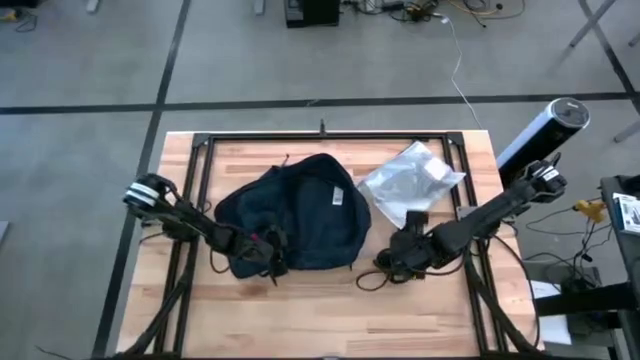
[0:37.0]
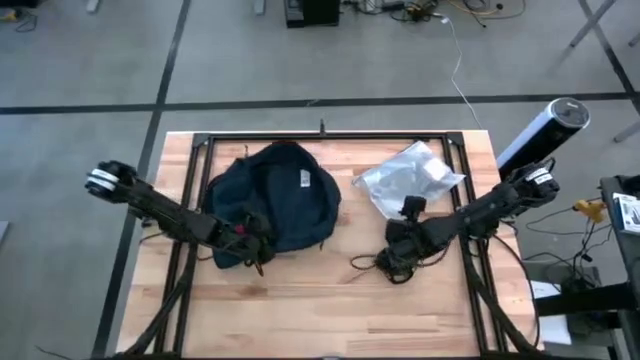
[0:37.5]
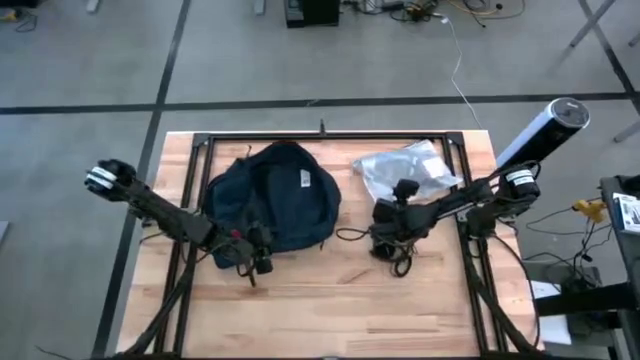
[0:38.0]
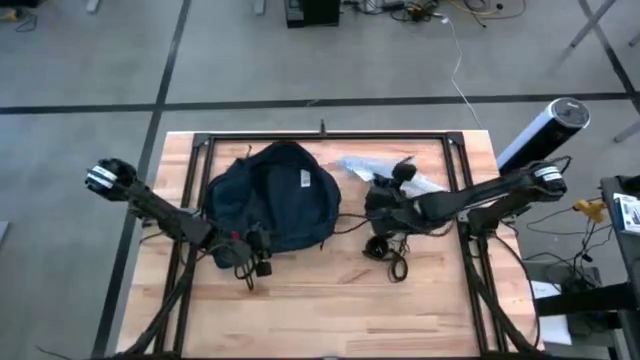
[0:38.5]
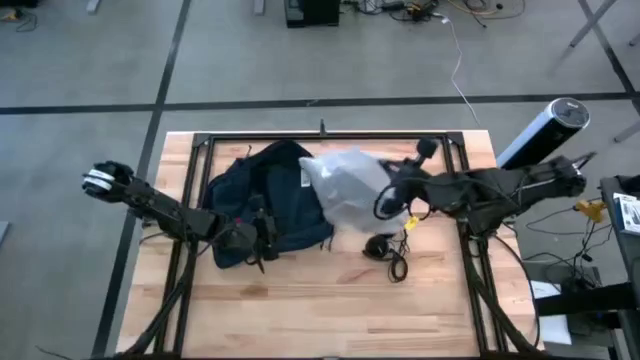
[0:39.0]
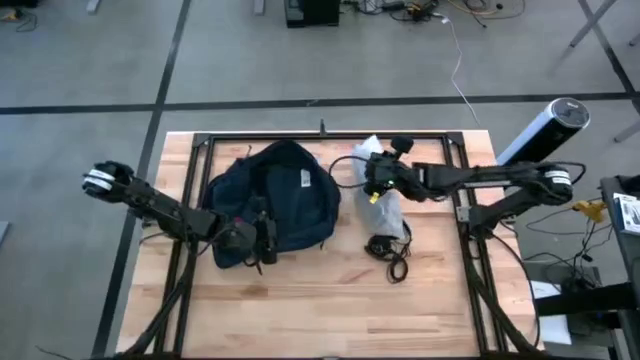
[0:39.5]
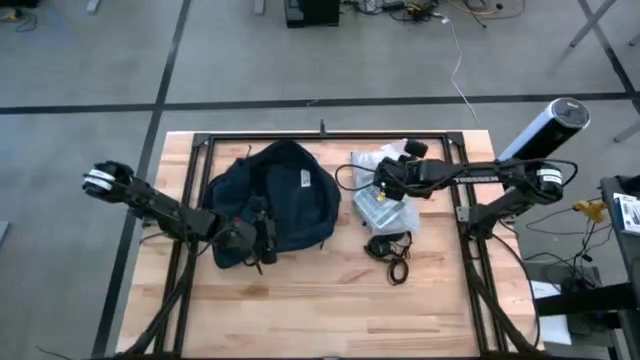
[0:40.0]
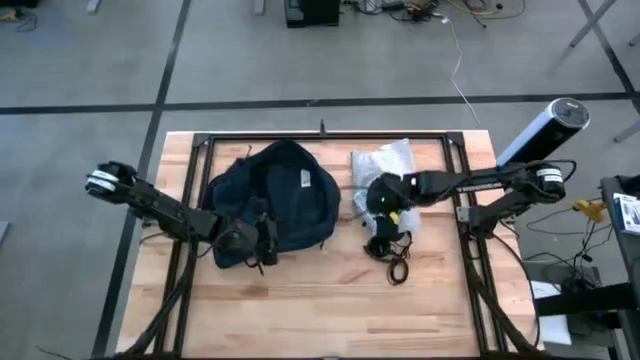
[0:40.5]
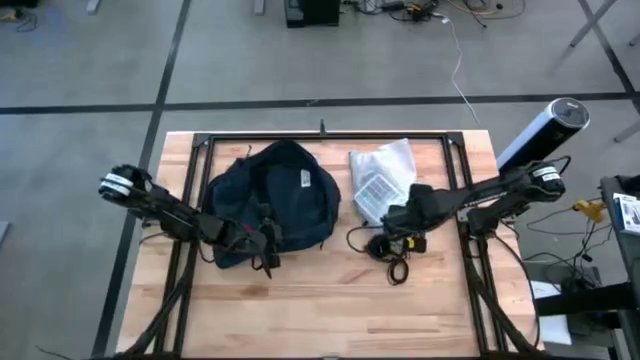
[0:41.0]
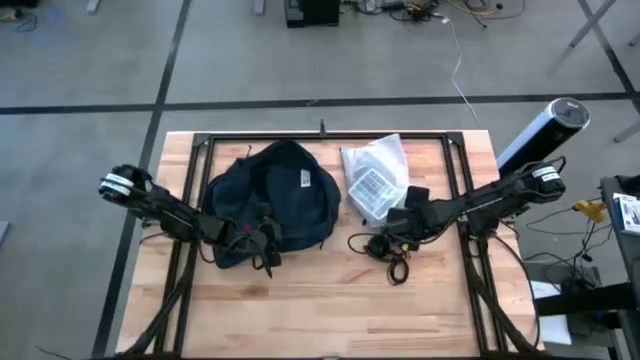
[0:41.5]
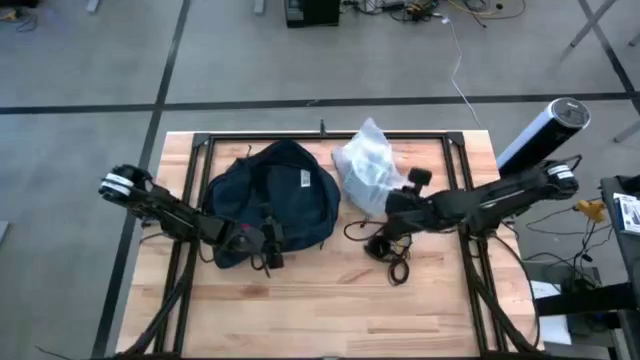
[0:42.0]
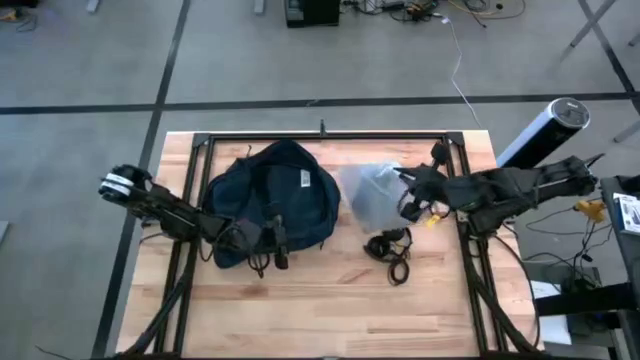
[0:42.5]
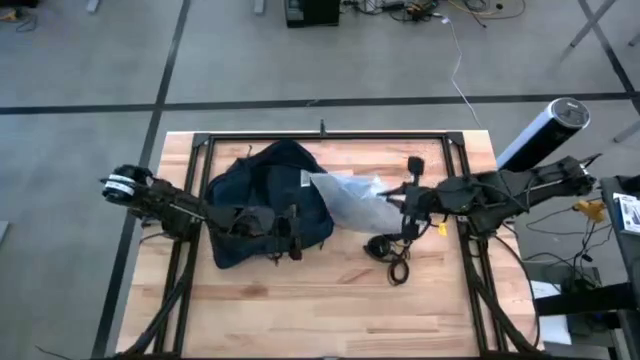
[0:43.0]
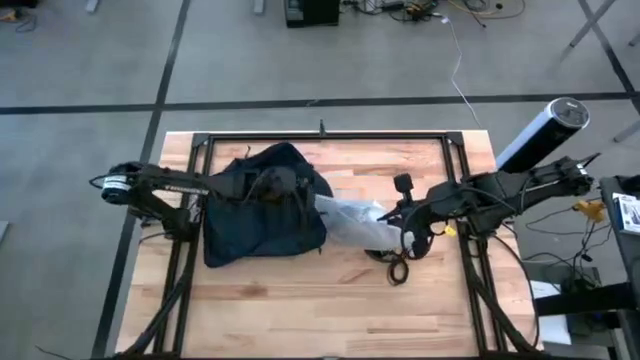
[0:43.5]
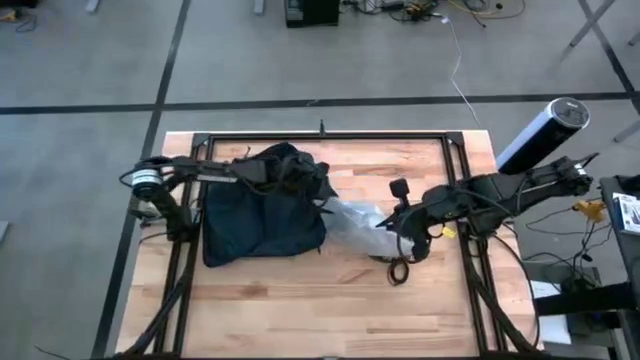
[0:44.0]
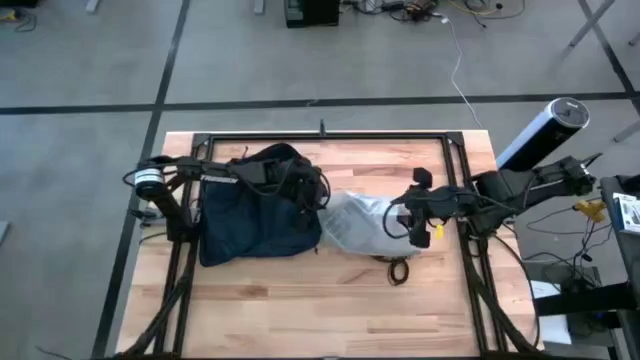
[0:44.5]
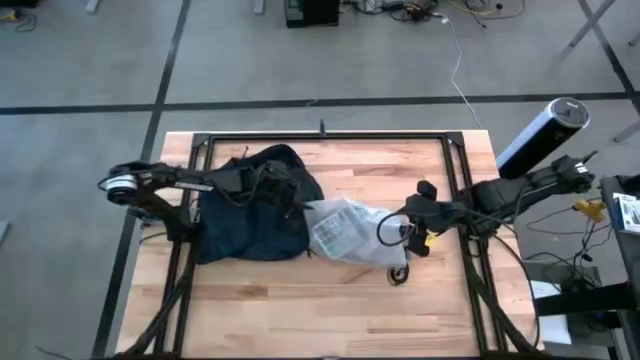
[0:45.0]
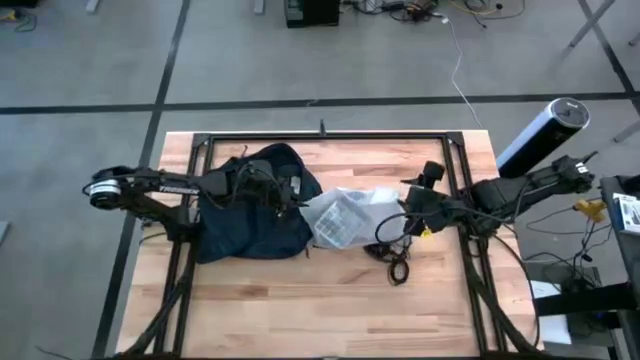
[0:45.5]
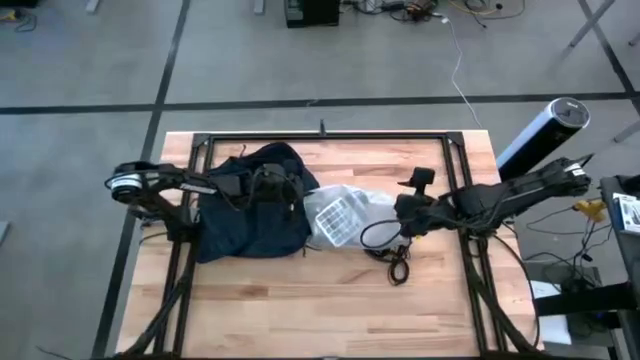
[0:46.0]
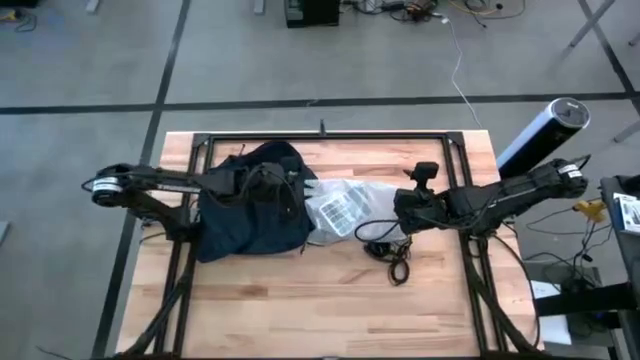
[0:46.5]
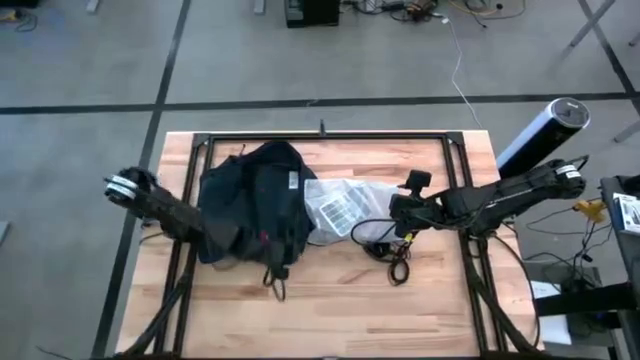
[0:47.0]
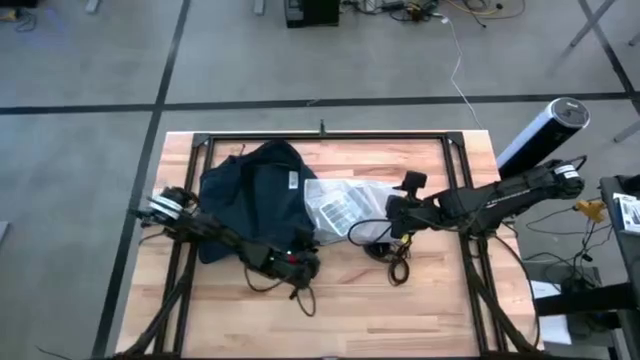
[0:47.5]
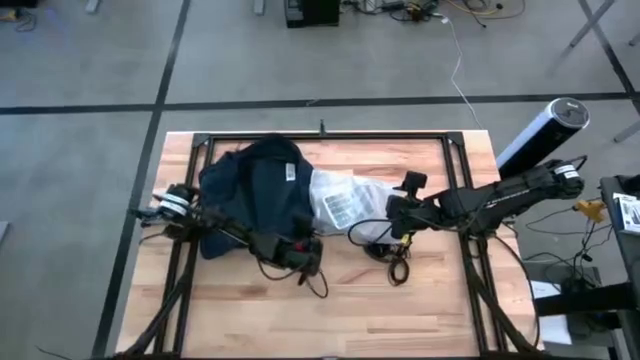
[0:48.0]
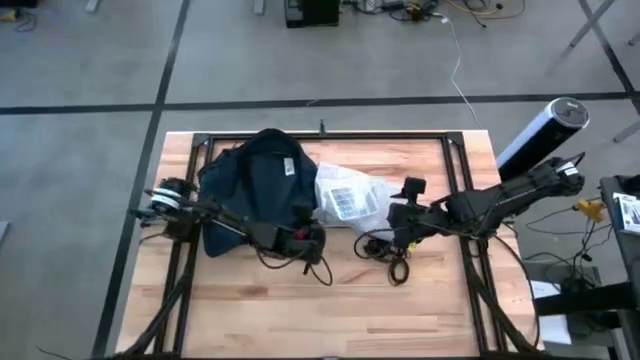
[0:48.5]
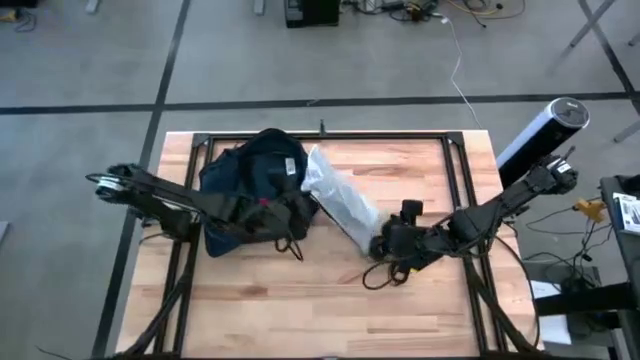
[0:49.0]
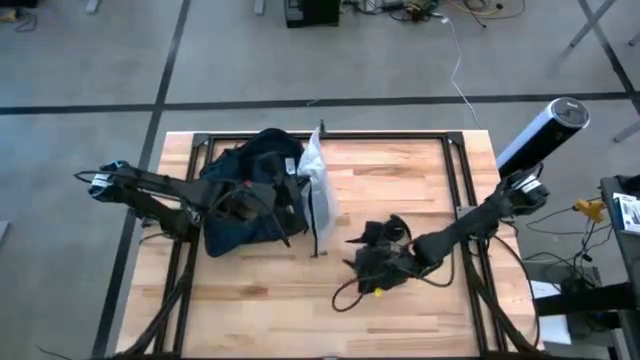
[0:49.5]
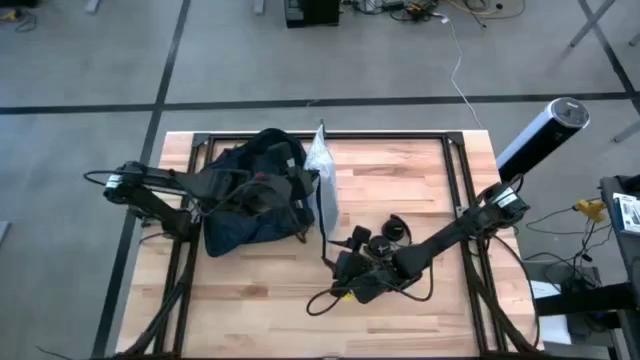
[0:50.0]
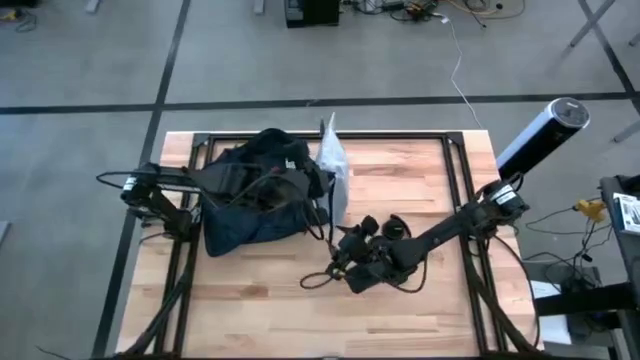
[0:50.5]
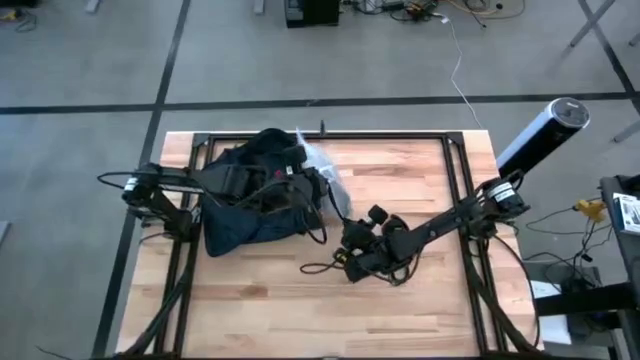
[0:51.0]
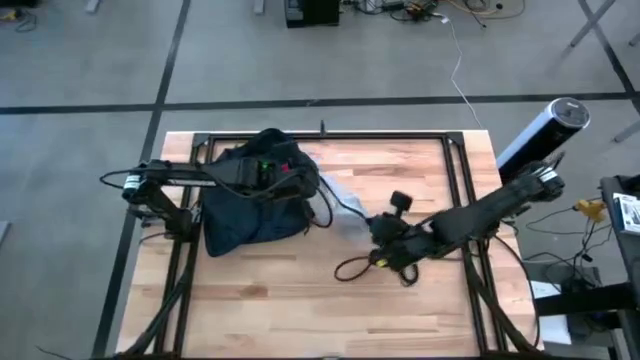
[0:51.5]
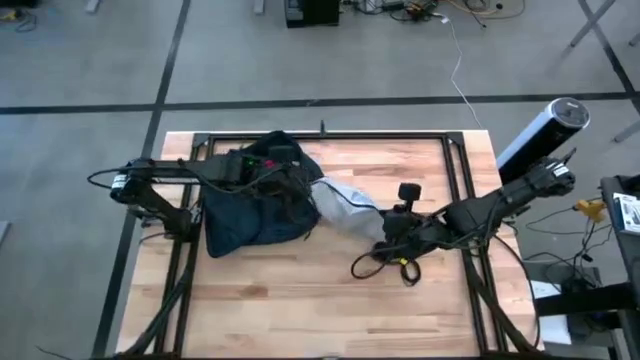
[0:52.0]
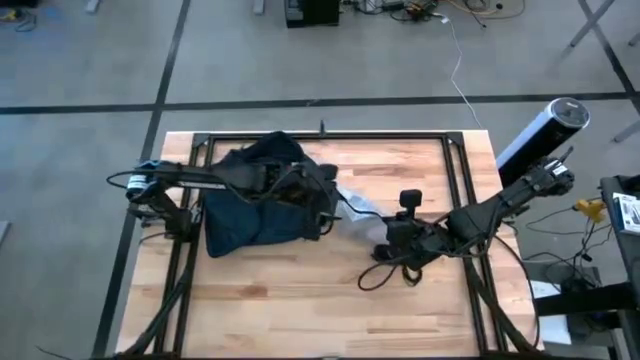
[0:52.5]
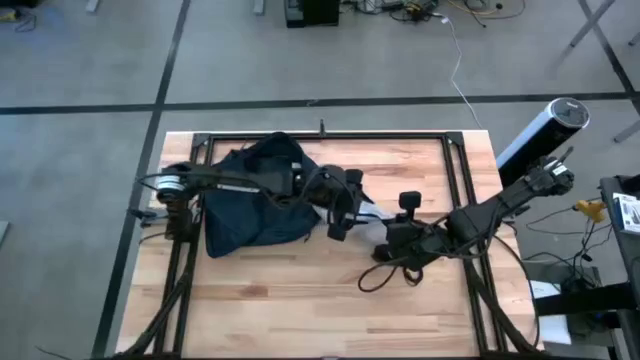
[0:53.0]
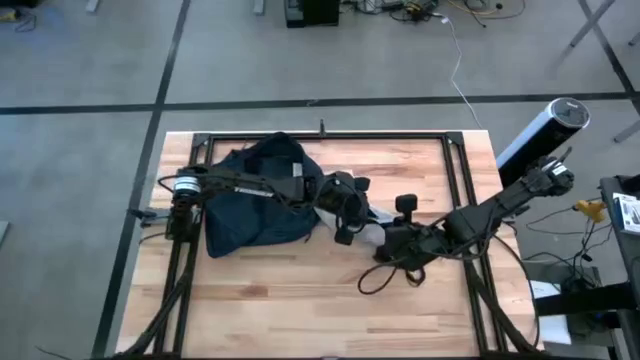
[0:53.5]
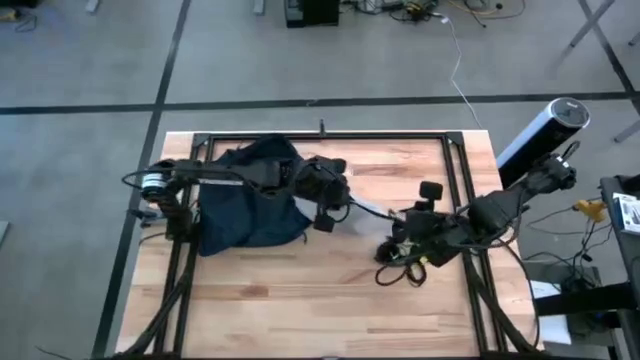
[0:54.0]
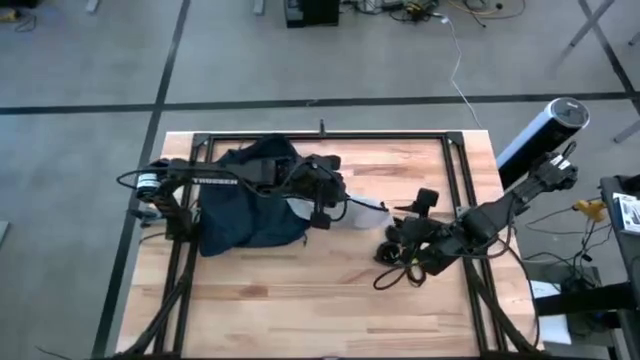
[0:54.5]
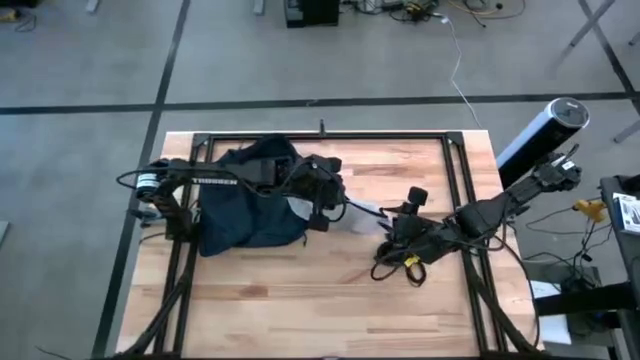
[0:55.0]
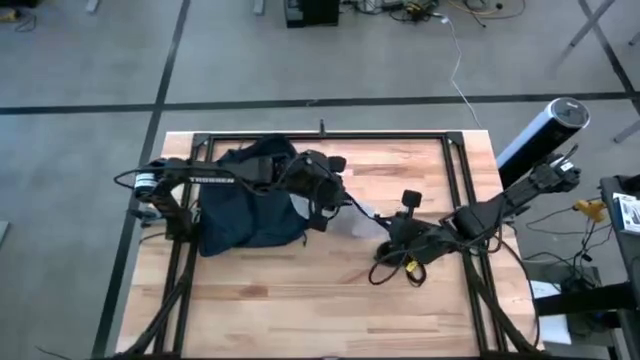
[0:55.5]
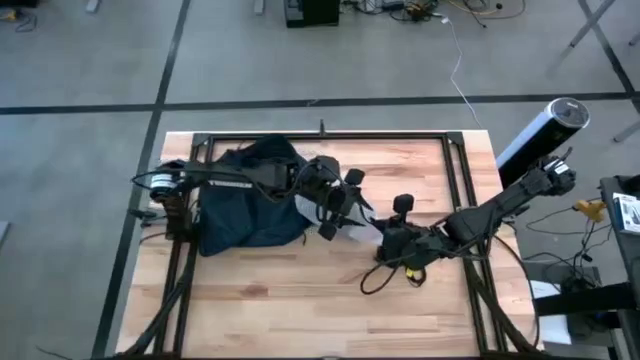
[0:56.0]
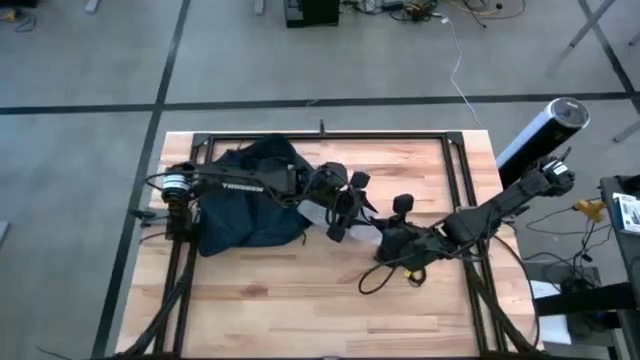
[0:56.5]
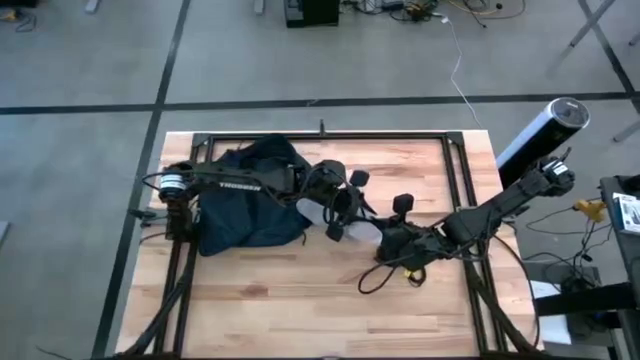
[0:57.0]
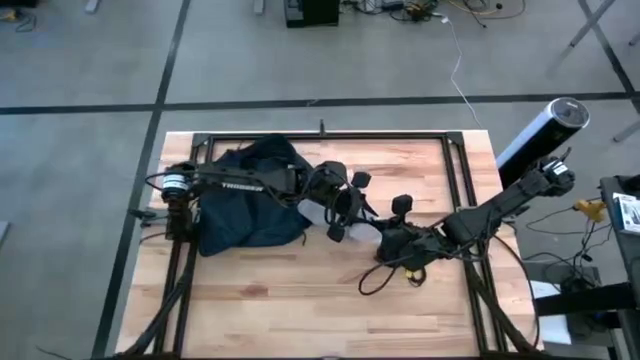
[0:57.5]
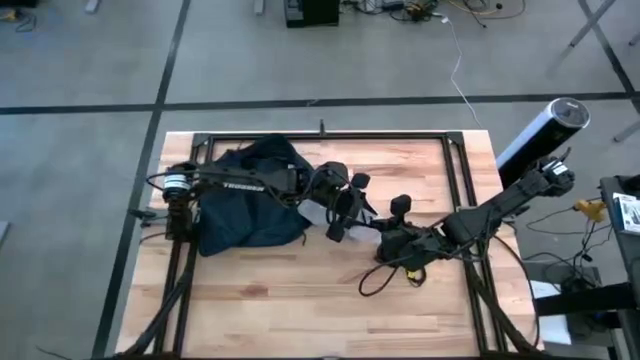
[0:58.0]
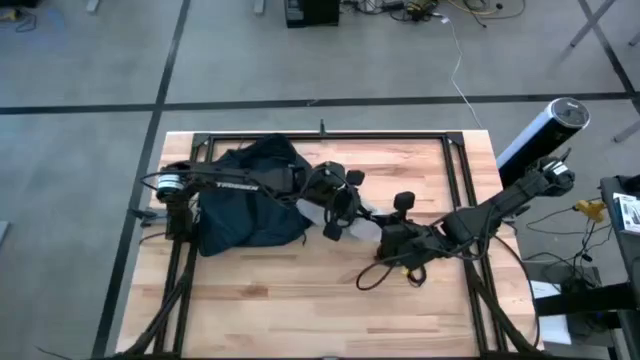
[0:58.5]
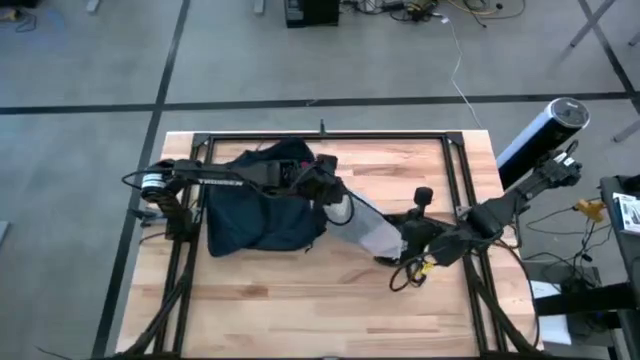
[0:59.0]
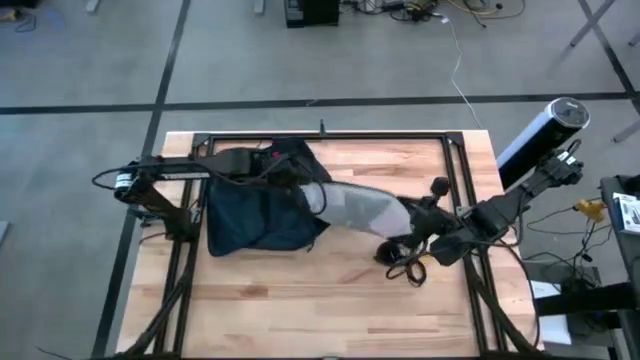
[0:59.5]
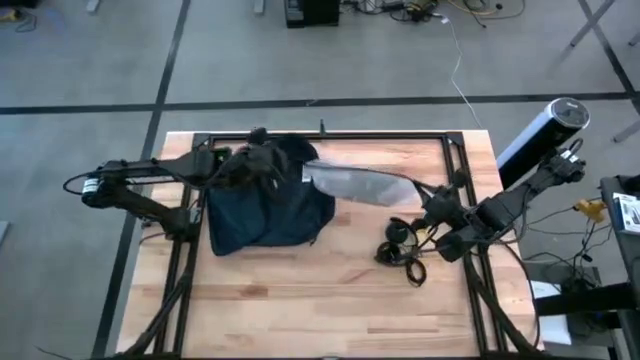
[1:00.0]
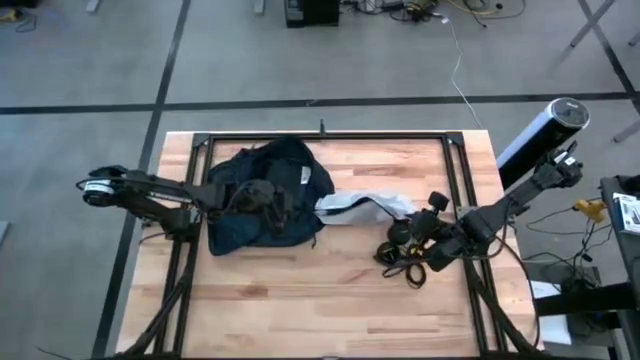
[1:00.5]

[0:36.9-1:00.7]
Task: Unpack backpack
Open the white zipper pouch
